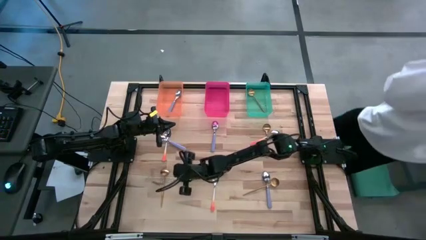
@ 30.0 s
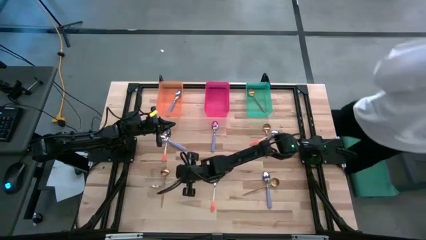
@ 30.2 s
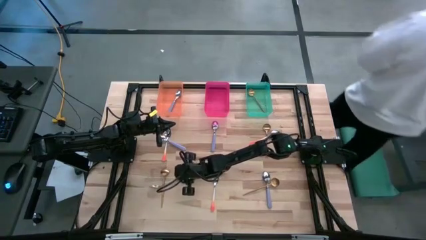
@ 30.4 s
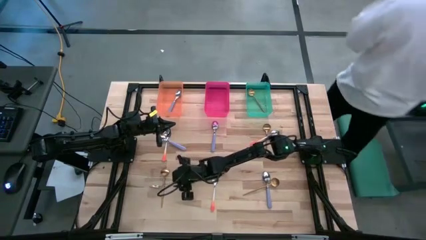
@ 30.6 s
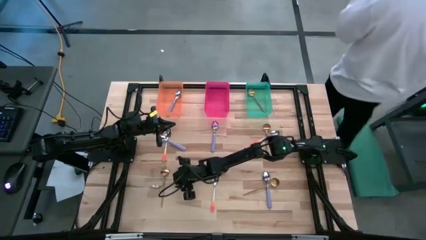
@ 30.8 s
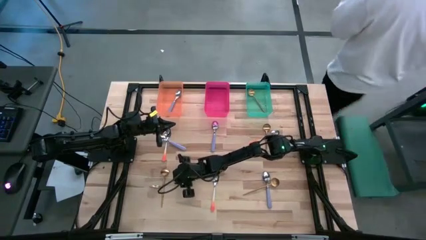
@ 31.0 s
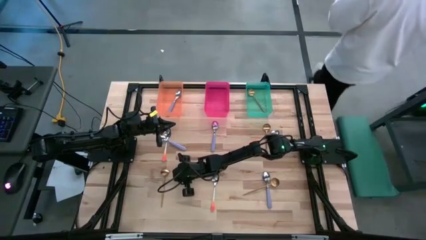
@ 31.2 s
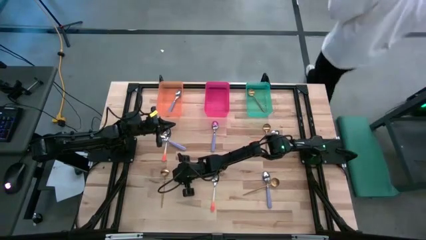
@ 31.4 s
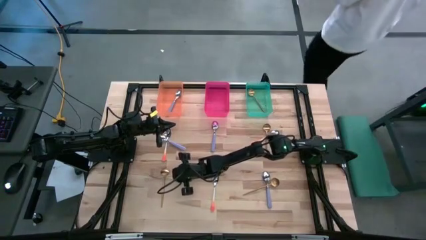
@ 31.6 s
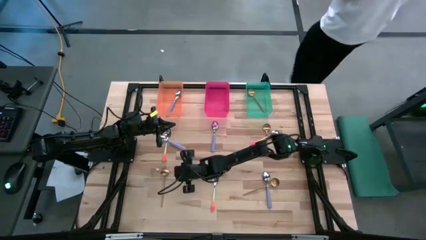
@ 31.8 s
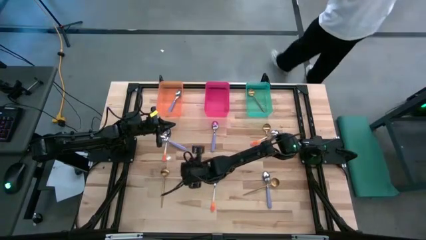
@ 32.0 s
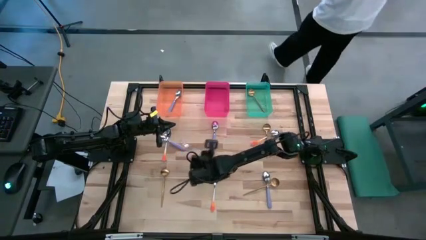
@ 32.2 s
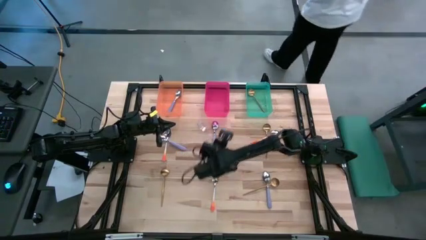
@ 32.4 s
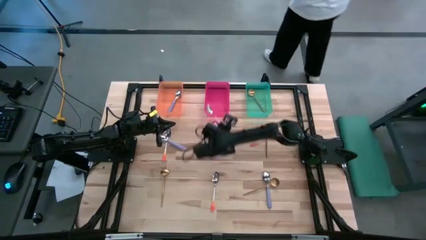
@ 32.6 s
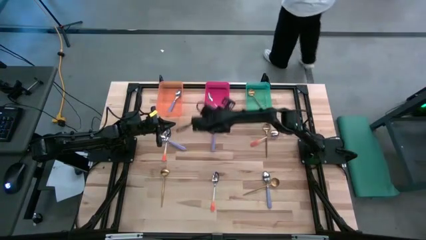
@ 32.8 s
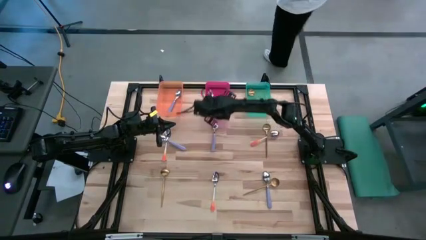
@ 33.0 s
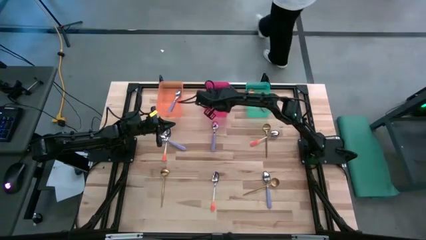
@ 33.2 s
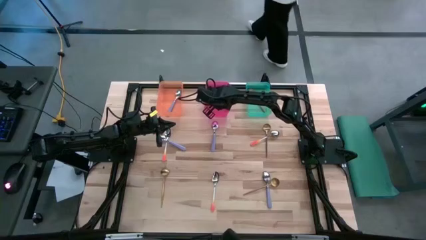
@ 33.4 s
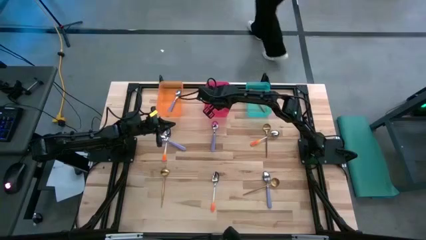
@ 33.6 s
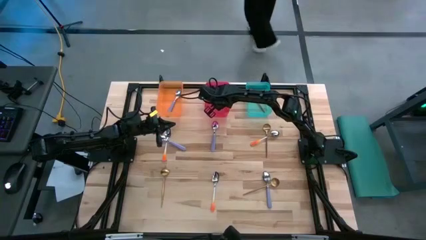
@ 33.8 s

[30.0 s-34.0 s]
Task: Sort silverware by color (type)
Put the orange spoon into the pink bin

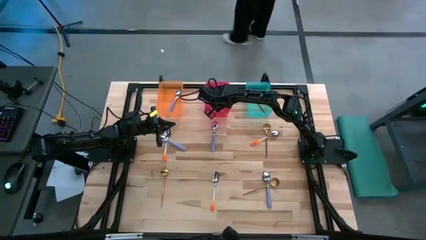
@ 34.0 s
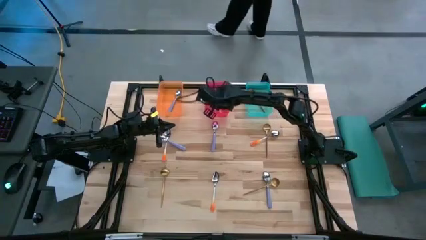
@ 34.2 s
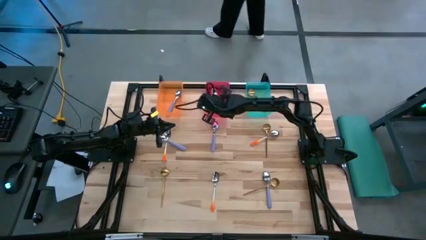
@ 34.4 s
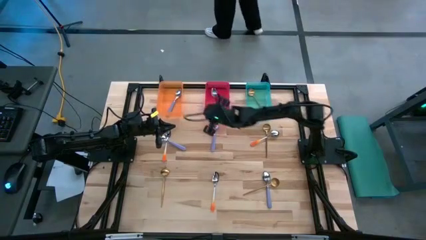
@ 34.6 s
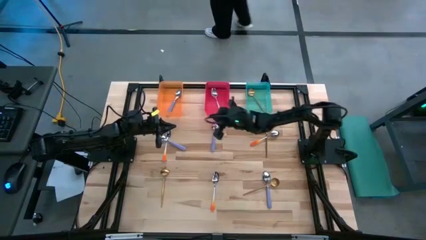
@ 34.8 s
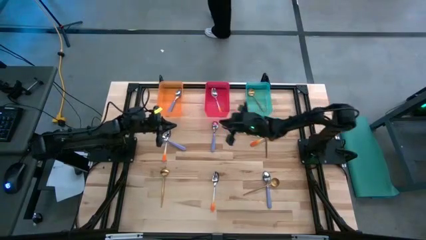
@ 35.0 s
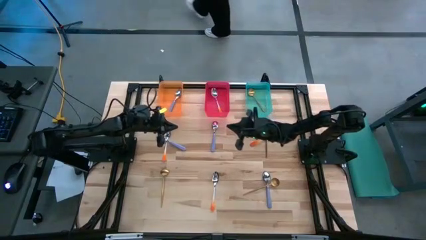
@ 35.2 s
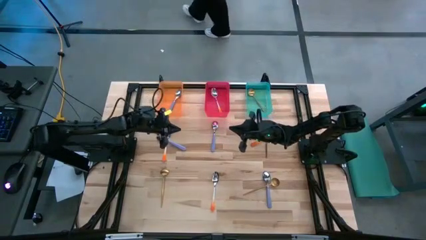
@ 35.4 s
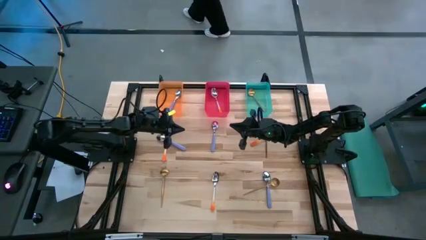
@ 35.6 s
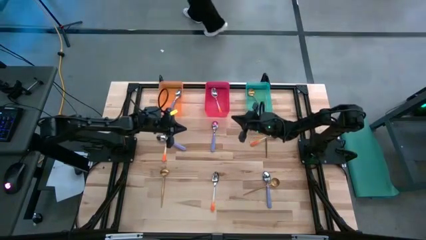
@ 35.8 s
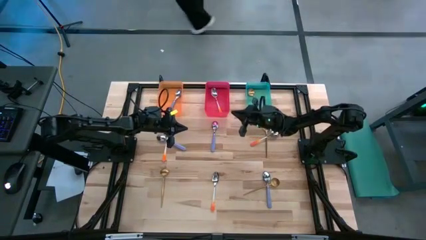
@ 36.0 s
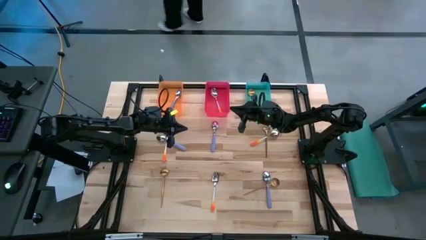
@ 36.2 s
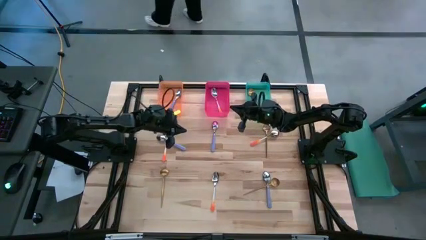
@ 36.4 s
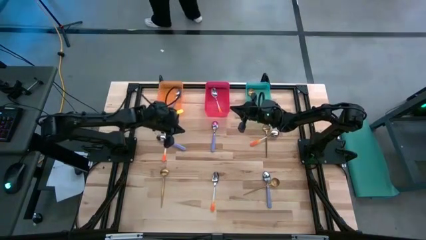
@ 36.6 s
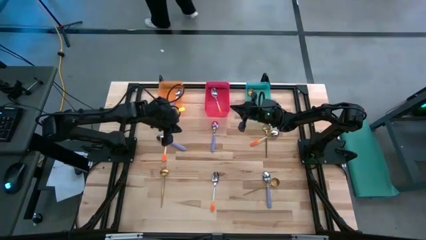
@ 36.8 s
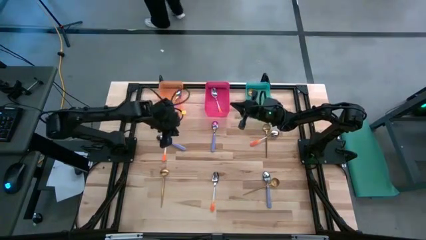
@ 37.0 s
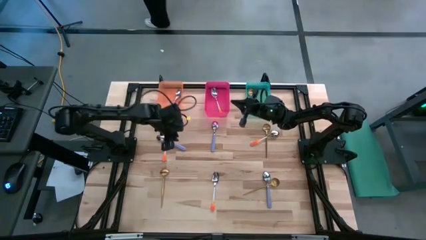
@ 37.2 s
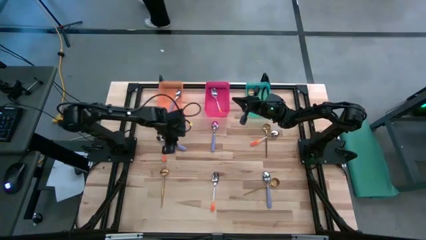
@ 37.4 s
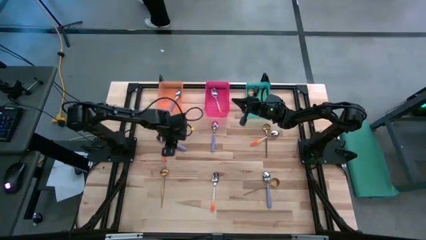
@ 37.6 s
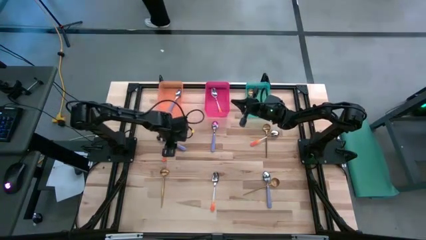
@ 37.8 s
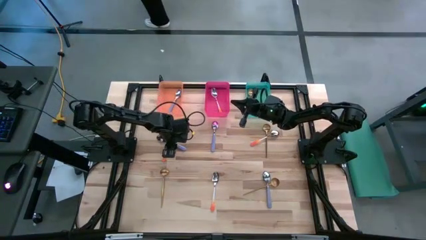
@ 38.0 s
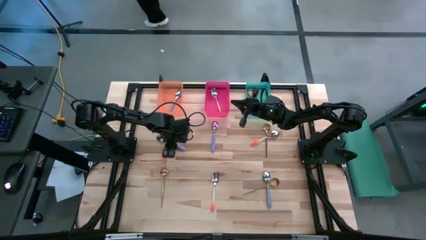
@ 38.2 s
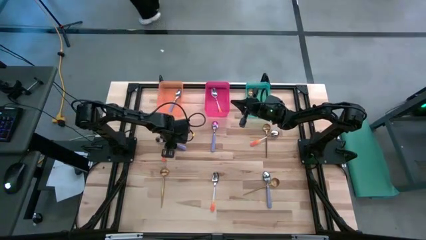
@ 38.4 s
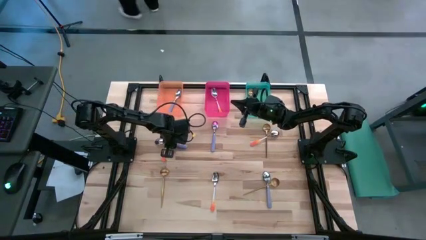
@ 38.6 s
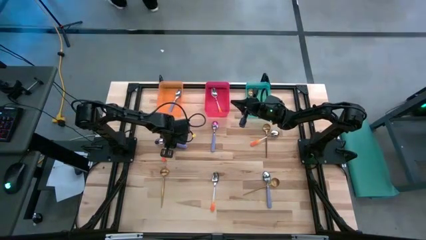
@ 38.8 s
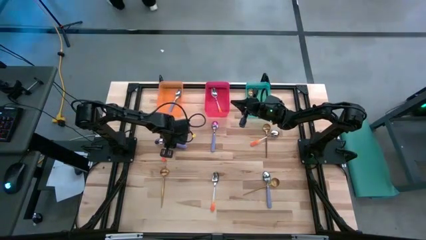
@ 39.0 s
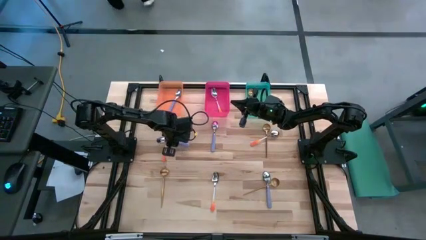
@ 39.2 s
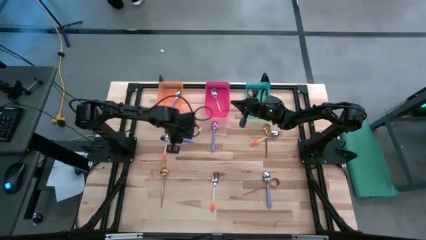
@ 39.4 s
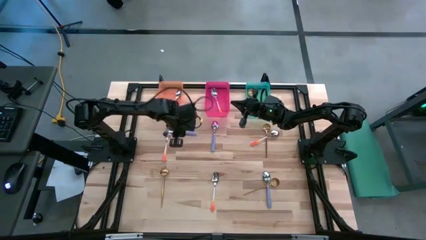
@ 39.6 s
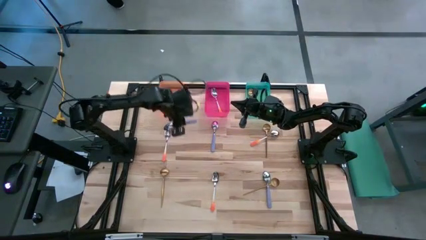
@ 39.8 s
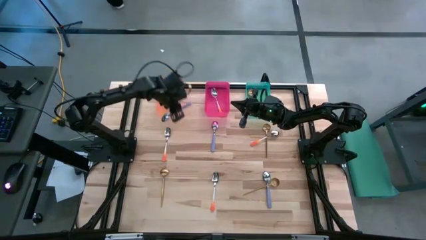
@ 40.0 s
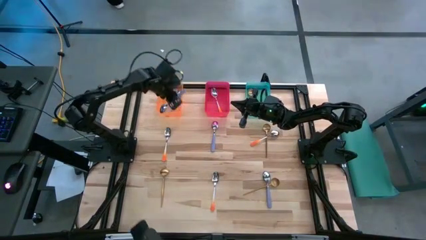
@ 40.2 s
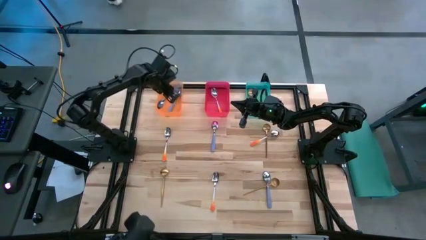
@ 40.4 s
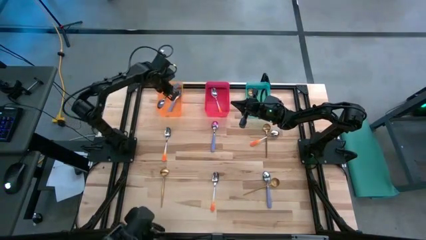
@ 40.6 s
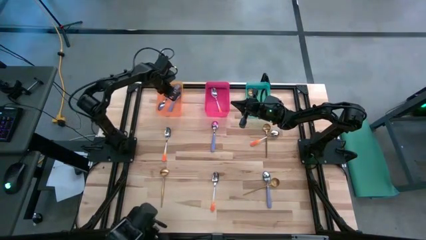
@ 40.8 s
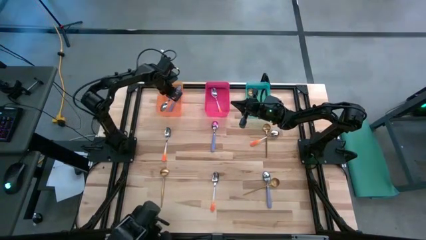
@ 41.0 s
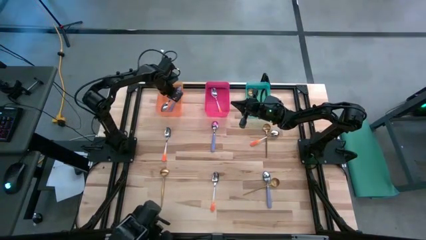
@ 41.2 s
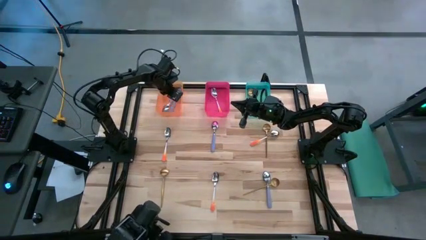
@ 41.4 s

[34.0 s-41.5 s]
Put the purple spoon into the orange bin

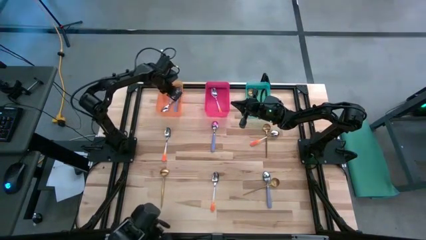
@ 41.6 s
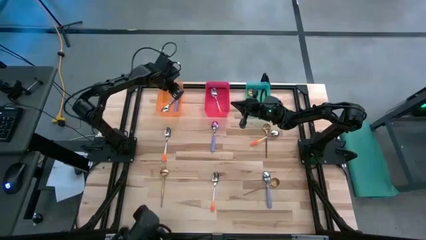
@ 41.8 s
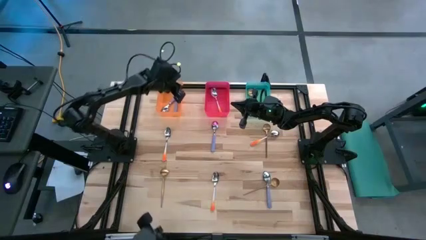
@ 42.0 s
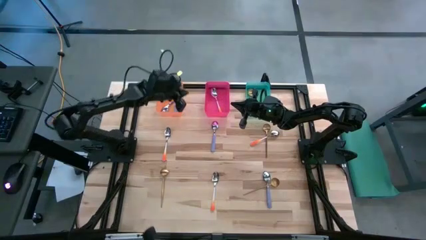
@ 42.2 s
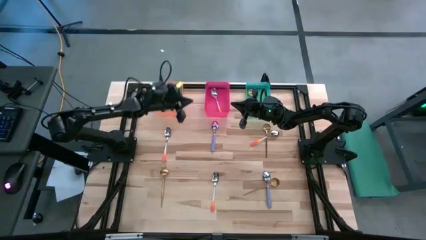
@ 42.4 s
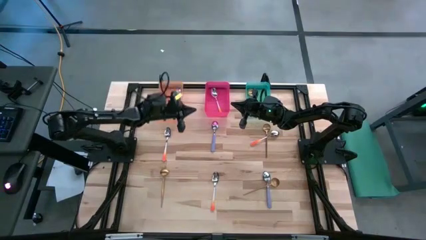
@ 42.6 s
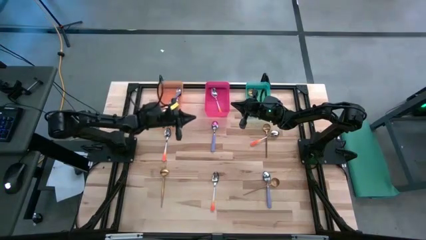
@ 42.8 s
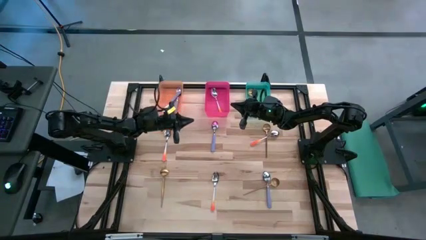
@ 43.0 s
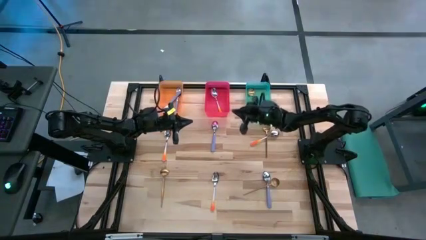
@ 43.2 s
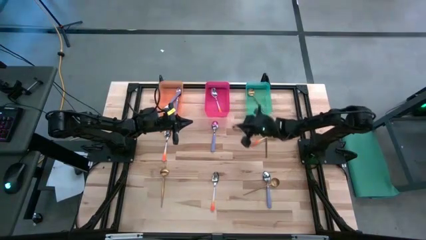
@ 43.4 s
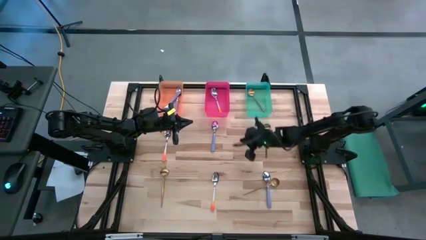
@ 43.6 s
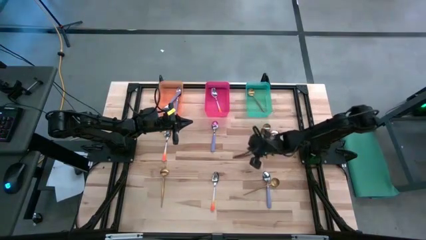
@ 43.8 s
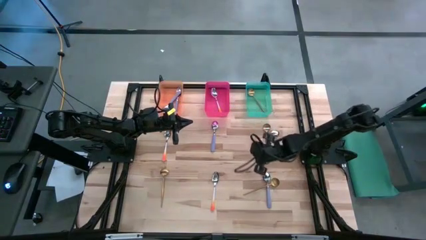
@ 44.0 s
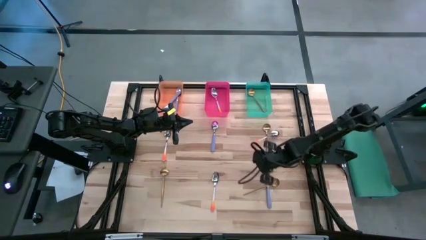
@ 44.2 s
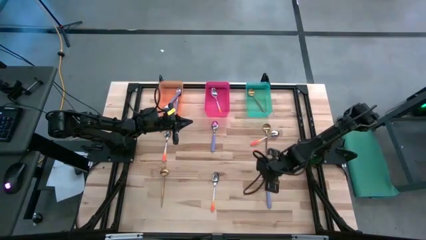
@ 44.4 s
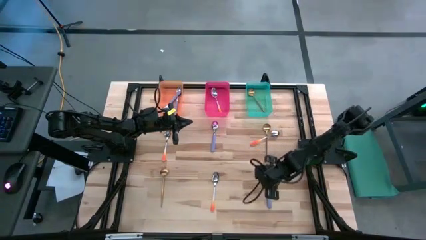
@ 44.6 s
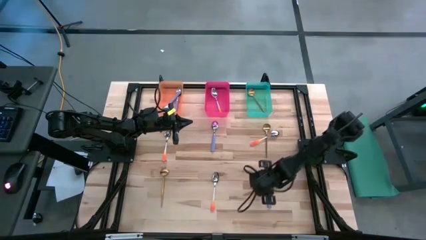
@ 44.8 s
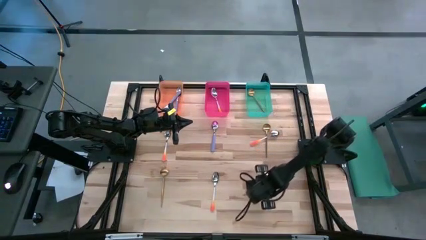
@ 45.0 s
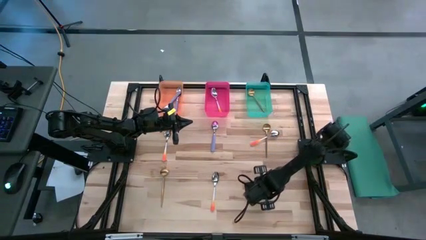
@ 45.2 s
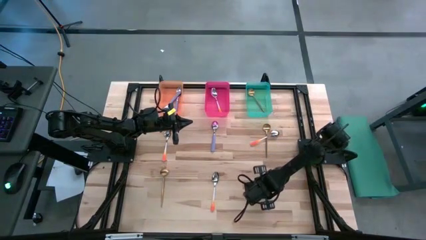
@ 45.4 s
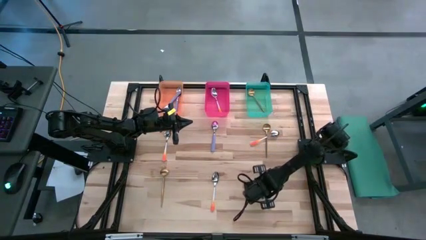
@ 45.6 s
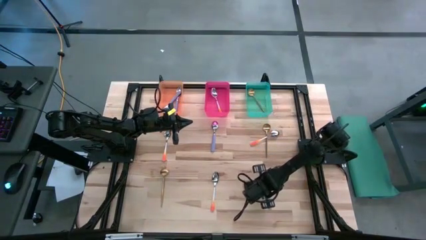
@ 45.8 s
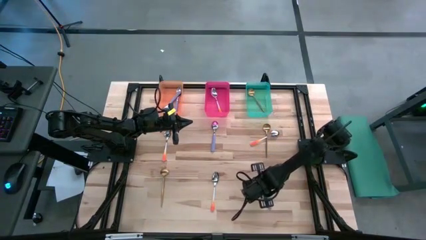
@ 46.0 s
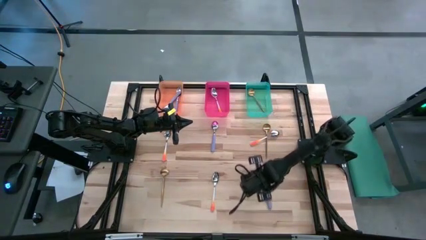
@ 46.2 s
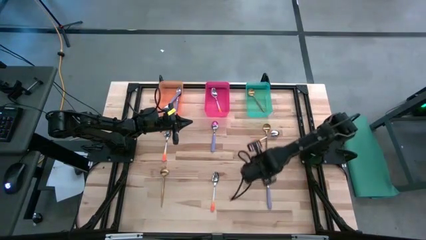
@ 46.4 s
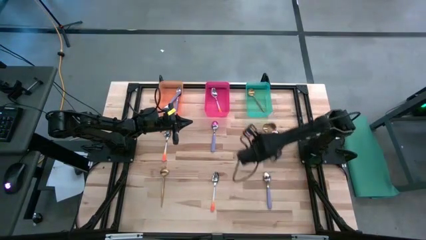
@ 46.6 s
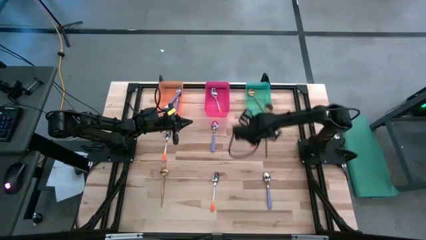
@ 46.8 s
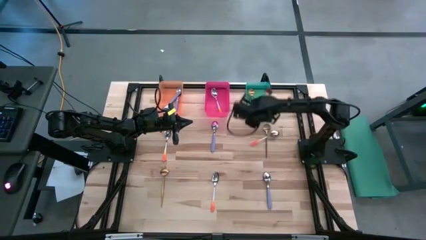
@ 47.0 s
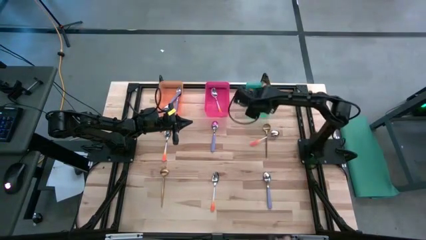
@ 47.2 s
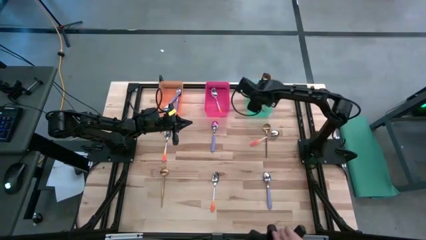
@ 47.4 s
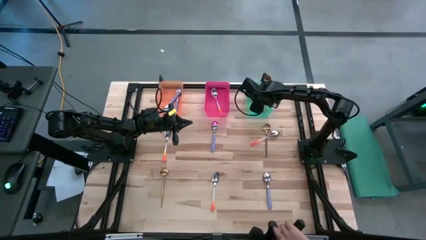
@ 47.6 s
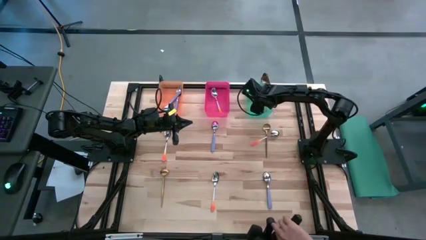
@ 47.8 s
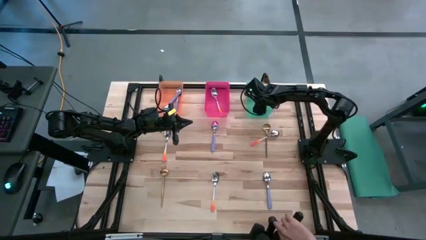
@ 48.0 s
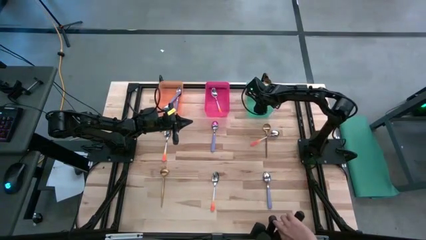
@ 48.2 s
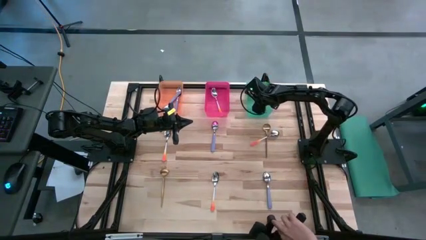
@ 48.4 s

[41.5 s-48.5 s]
Put the golden spoon into the green bin
